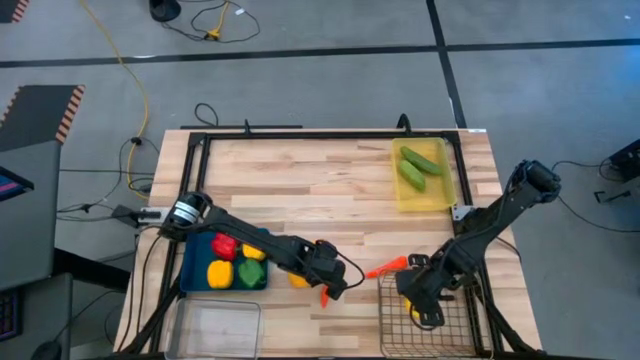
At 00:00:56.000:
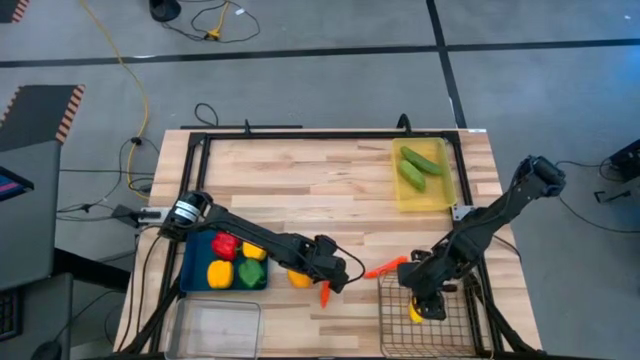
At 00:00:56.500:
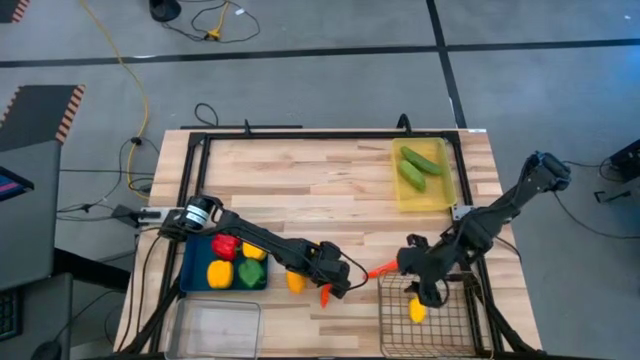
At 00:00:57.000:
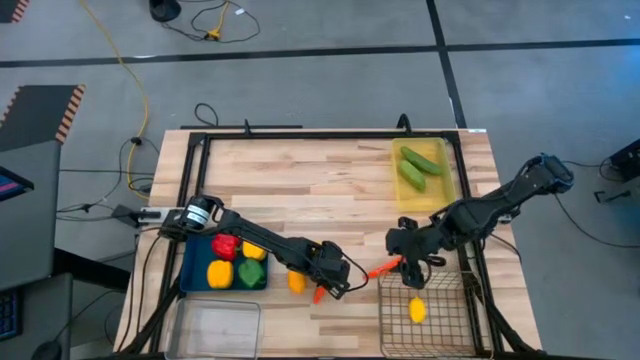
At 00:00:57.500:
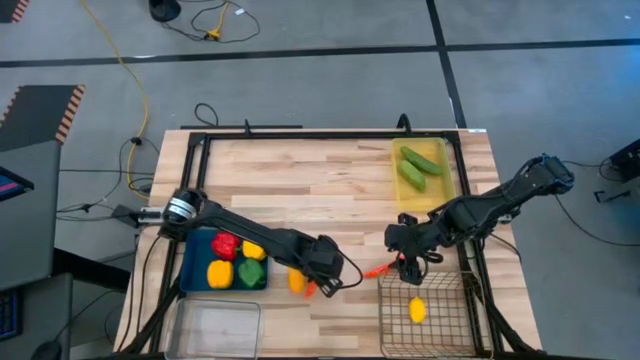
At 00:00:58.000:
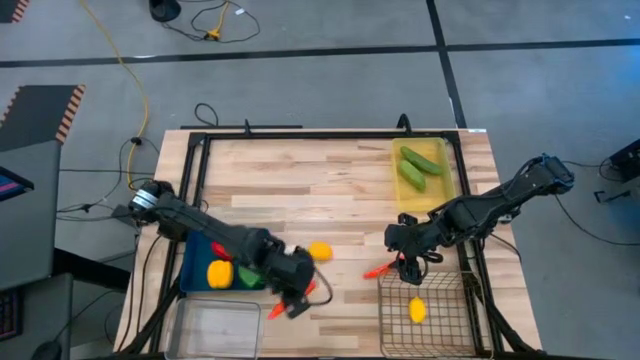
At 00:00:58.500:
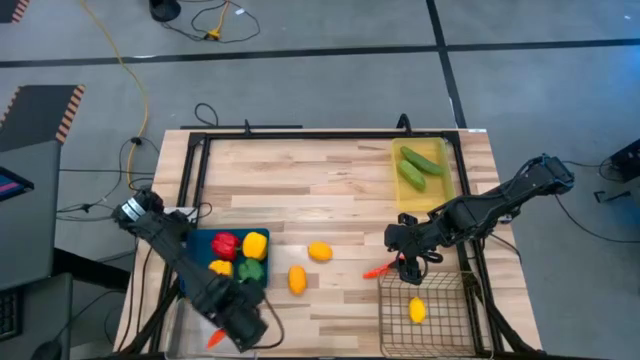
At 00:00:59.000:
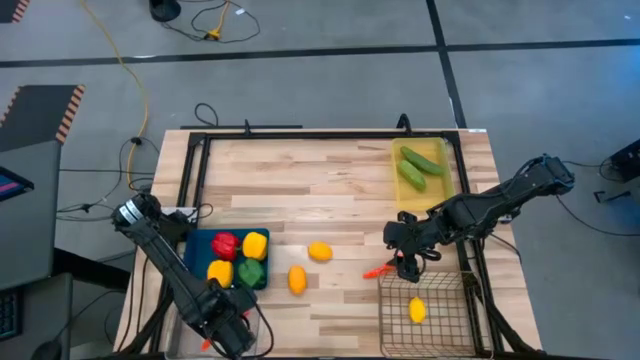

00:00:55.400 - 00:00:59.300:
Task: Sort produce into baskets
Put the left orange carrot into the transparent bin

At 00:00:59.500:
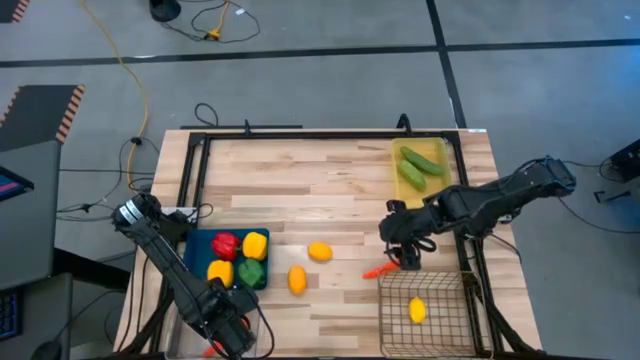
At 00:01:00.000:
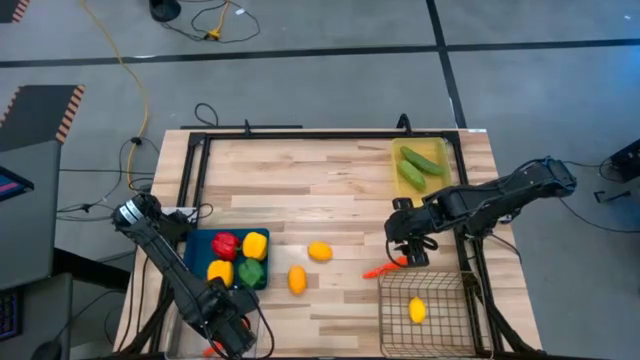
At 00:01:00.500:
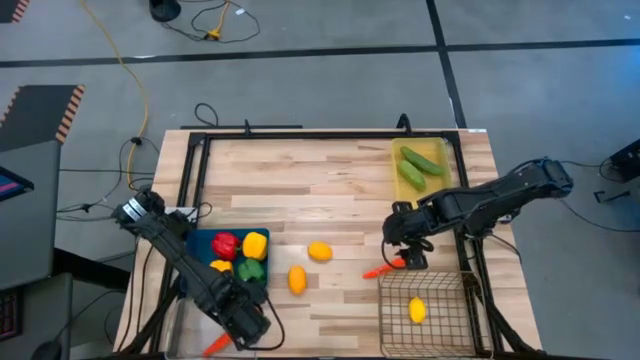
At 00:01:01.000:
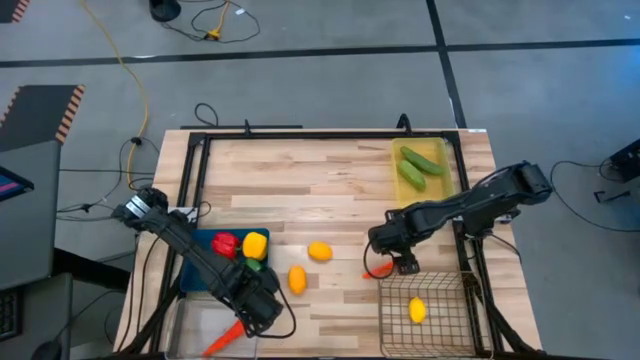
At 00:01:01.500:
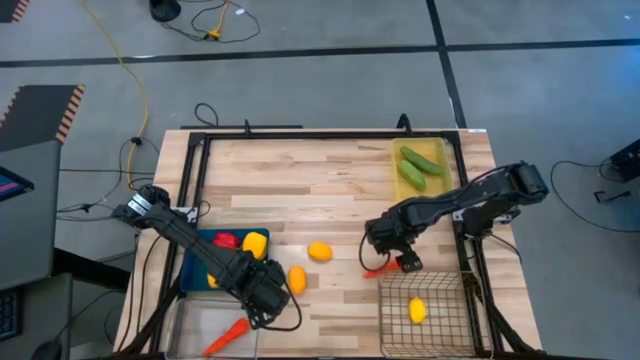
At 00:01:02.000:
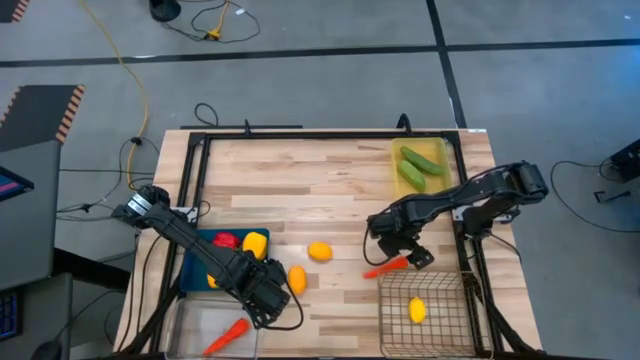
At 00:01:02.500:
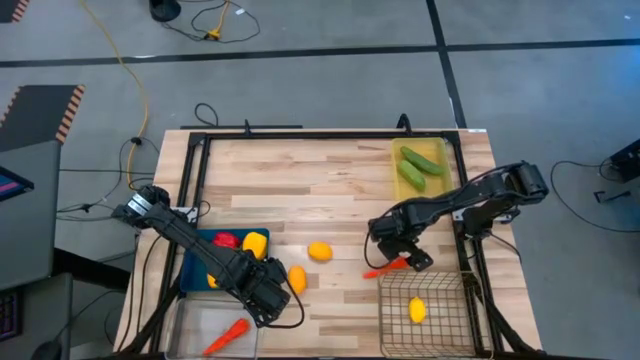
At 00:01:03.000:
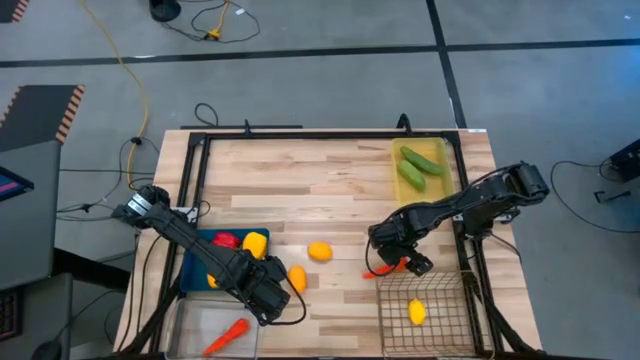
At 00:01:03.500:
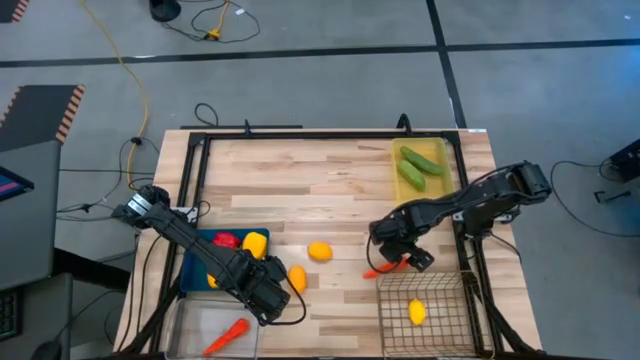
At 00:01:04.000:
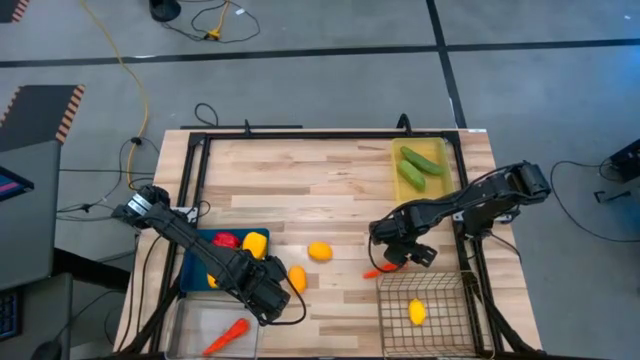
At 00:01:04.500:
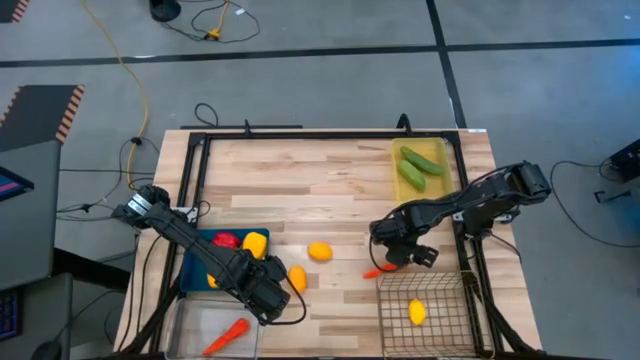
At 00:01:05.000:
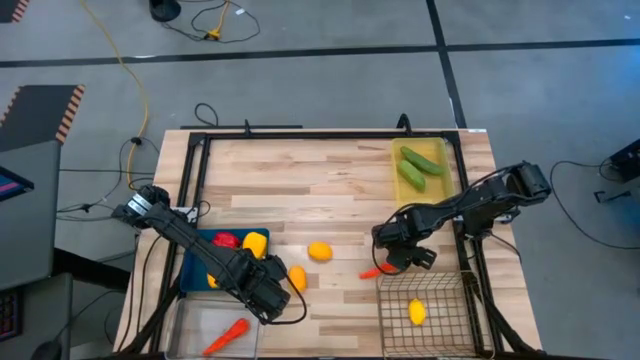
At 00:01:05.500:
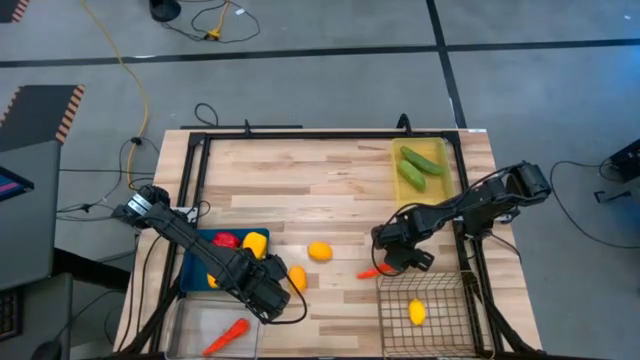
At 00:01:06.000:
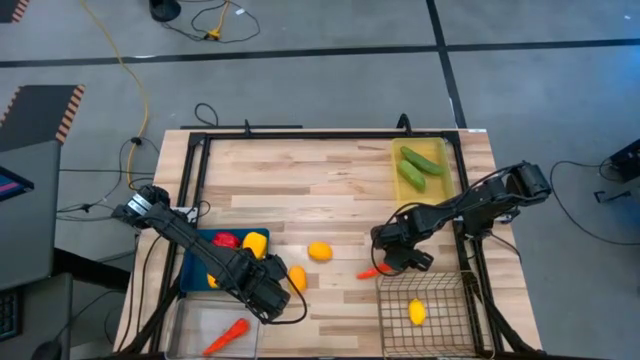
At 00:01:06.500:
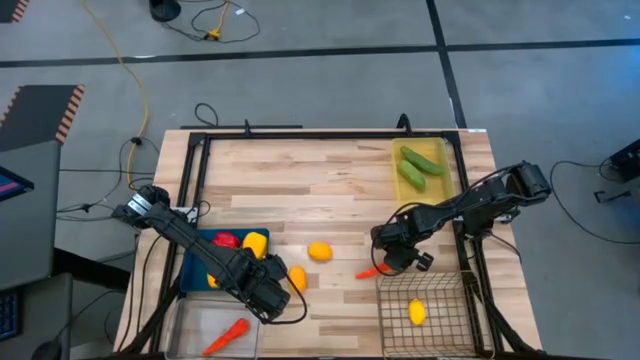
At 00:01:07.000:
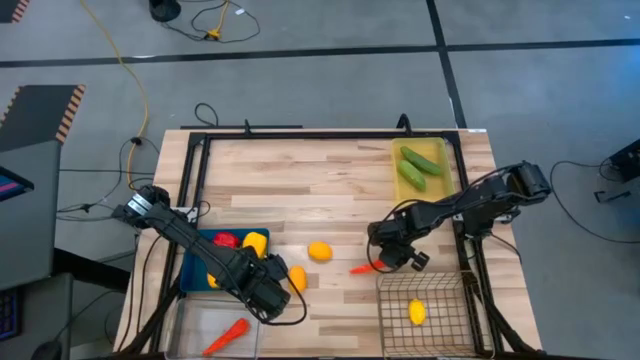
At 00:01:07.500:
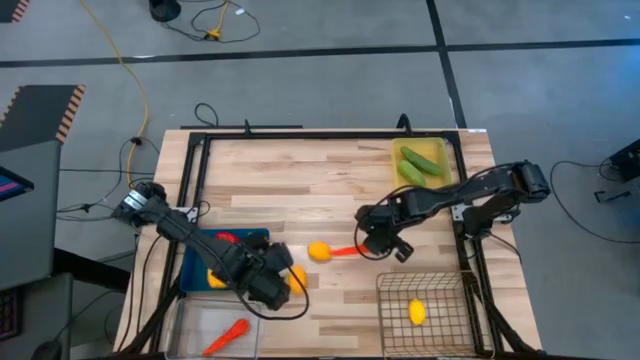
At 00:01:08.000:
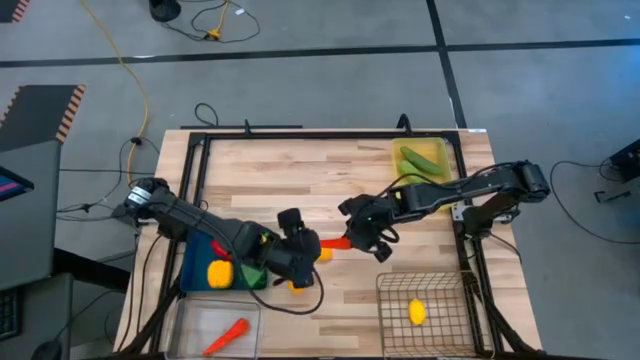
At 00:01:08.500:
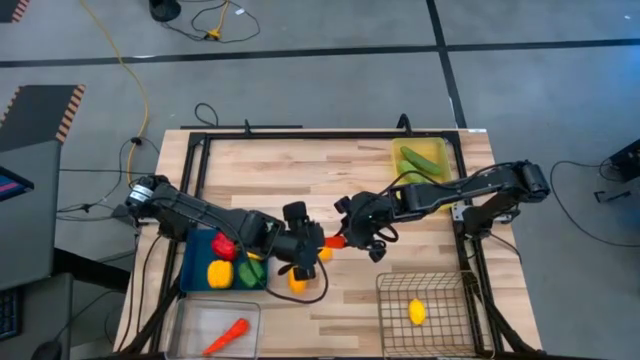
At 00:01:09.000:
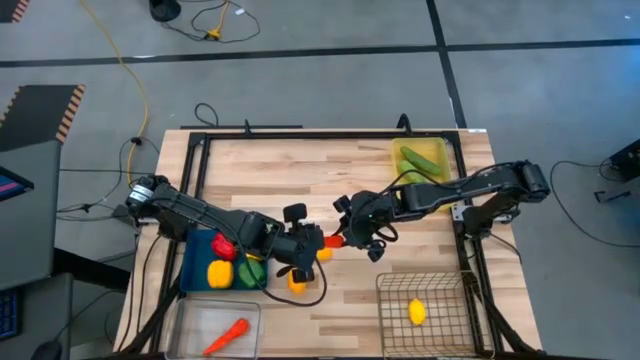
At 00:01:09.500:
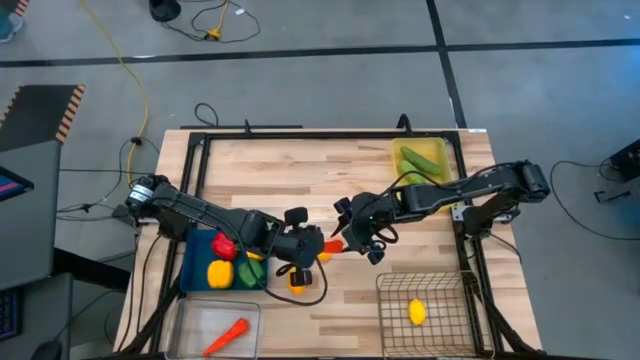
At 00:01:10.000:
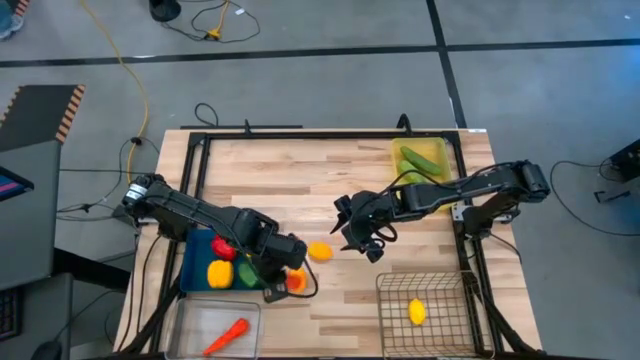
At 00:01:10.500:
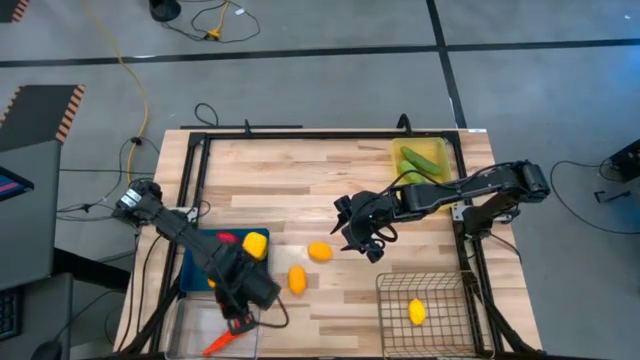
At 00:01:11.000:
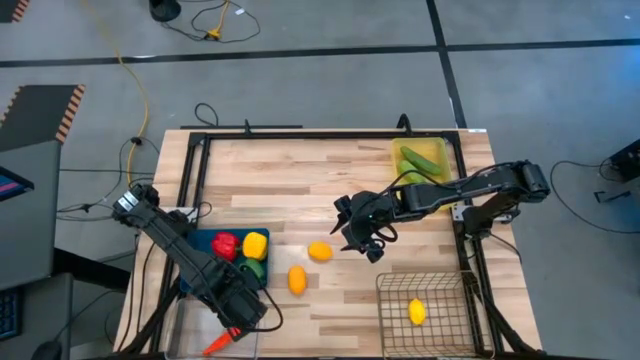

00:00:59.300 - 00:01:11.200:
Put the orange carrot into the transparent bin

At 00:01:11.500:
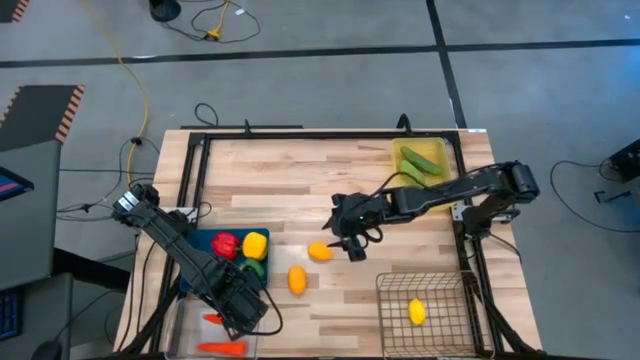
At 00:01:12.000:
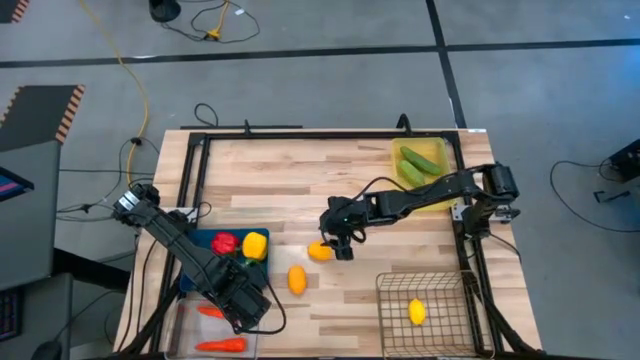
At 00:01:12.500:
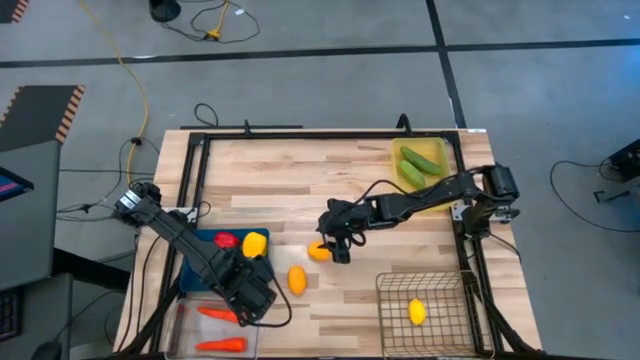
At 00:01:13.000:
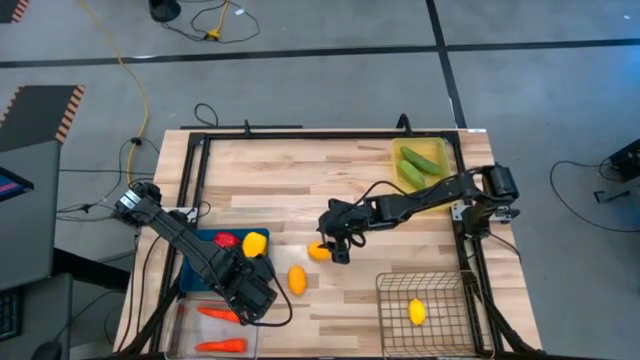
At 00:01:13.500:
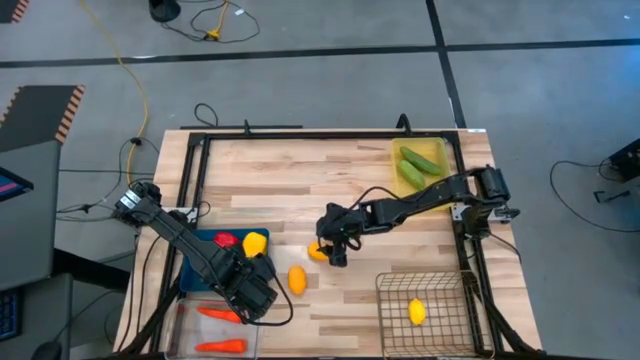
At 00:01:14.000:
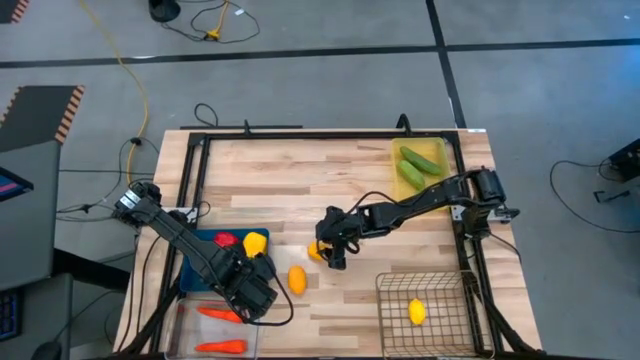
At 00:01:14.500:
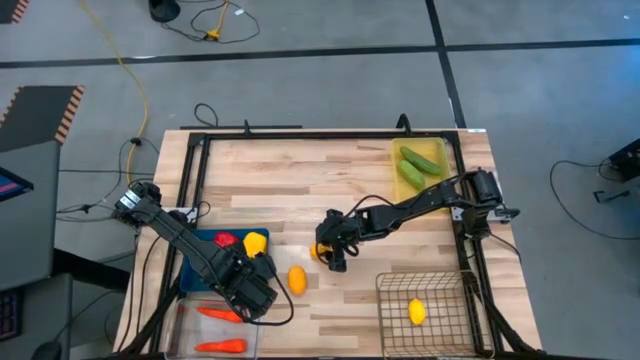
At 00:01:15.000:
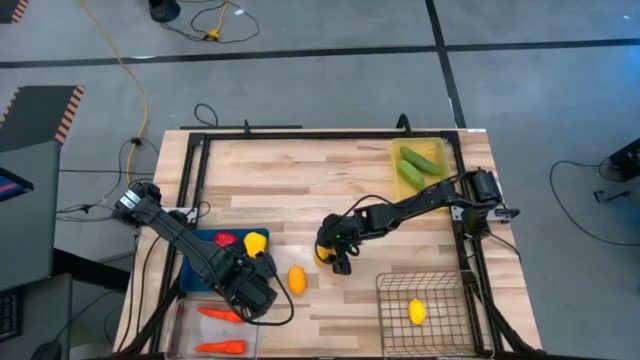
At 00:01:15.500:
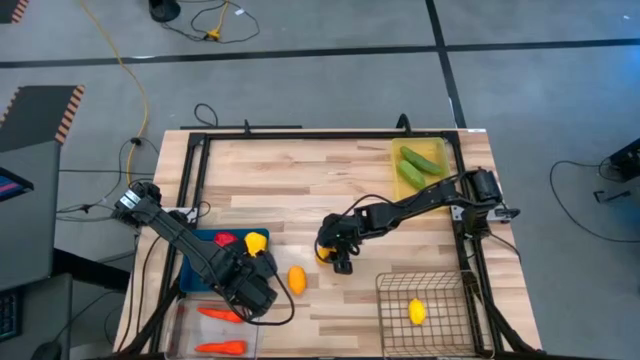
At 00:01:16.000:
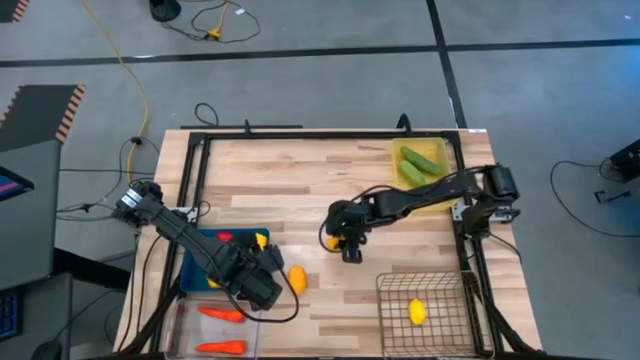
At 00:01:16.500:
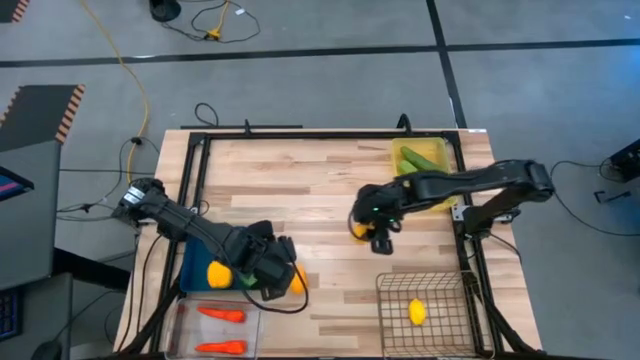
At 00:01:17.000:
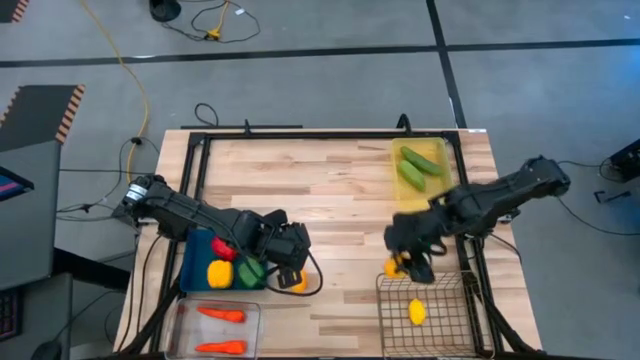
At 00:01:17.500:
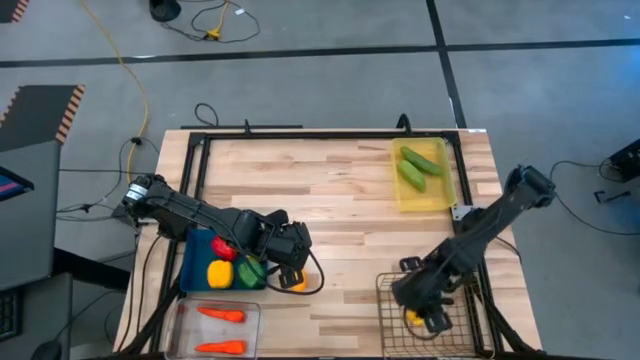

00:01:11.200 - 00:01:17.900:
Put the right yellow mango into the wire basket
